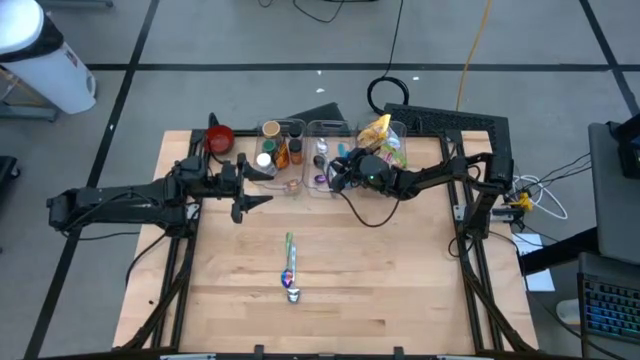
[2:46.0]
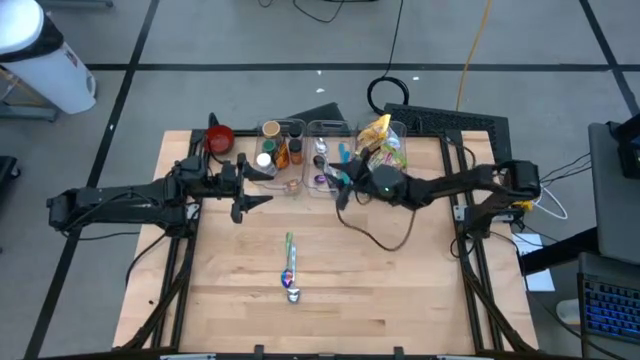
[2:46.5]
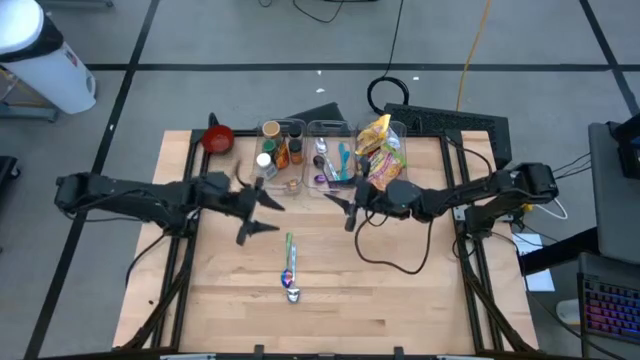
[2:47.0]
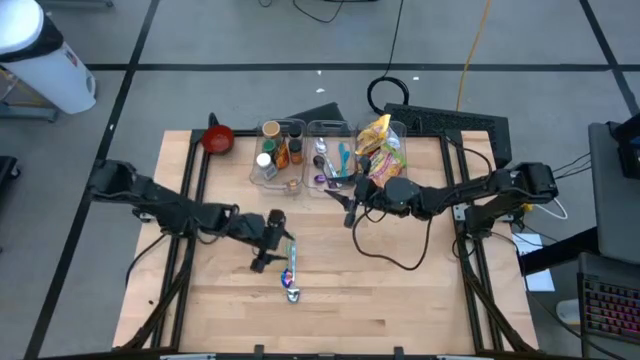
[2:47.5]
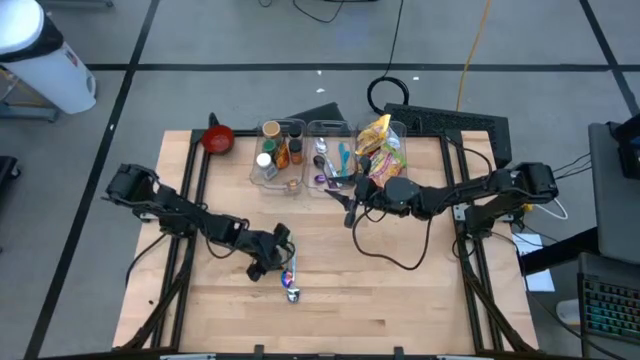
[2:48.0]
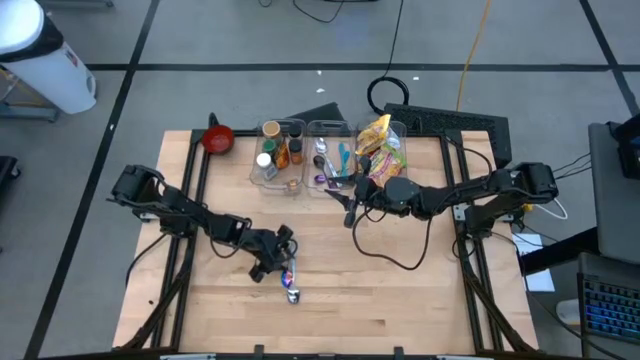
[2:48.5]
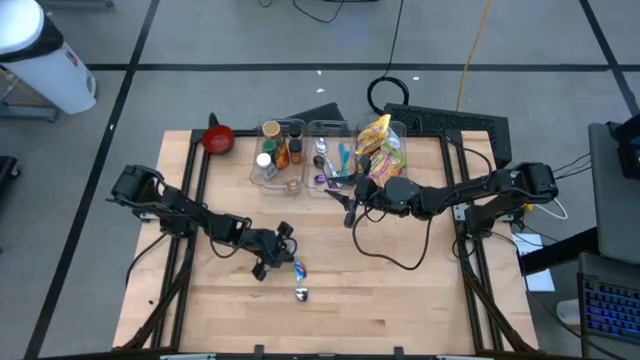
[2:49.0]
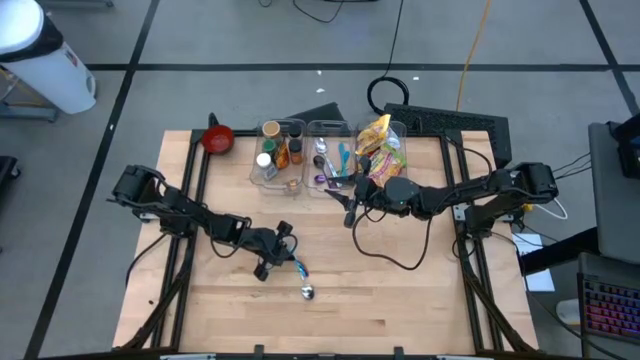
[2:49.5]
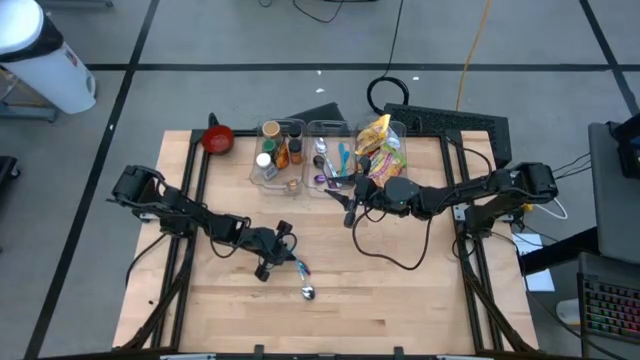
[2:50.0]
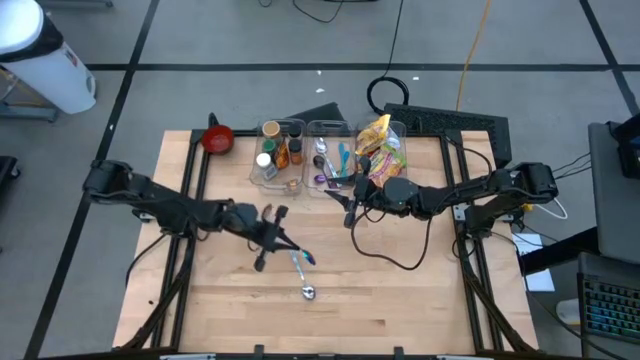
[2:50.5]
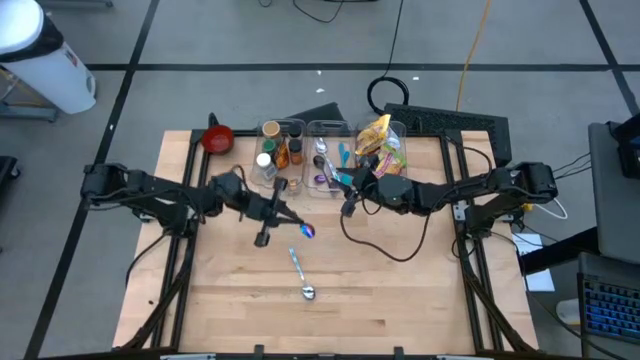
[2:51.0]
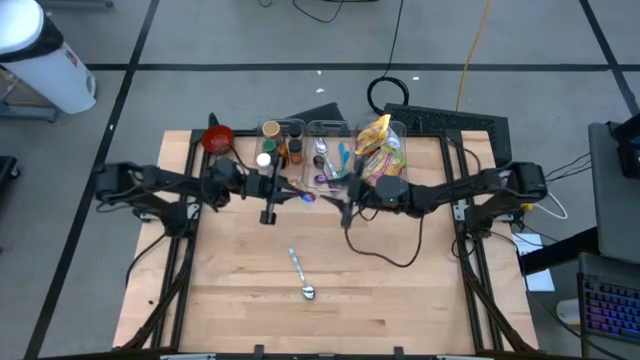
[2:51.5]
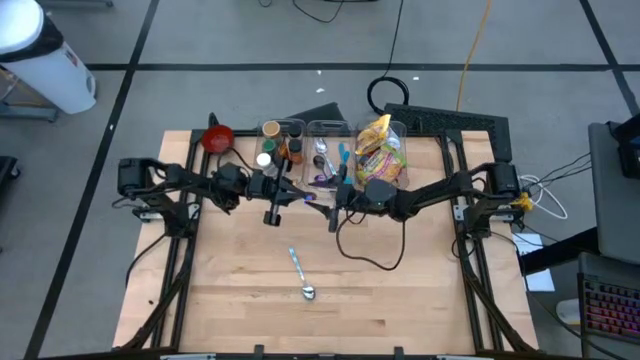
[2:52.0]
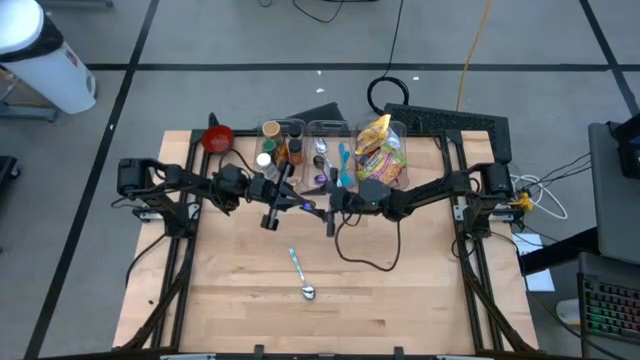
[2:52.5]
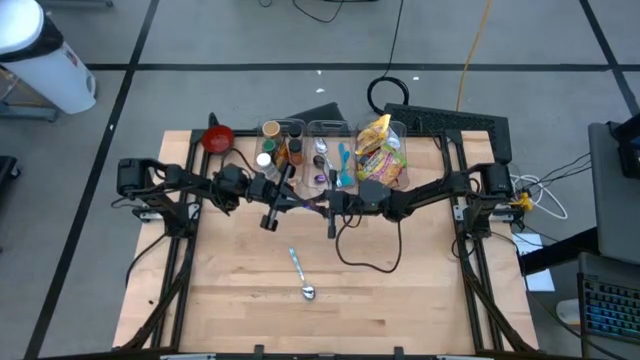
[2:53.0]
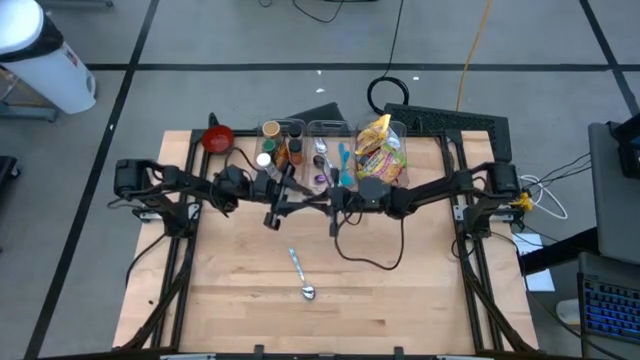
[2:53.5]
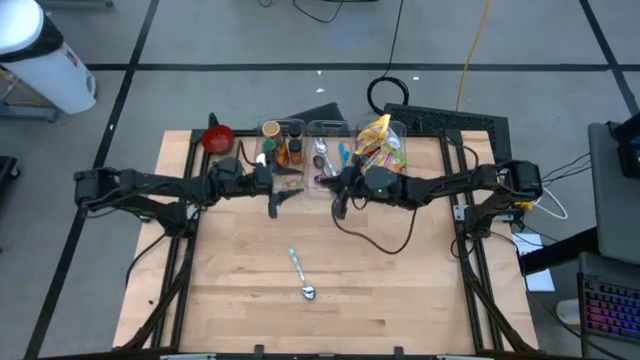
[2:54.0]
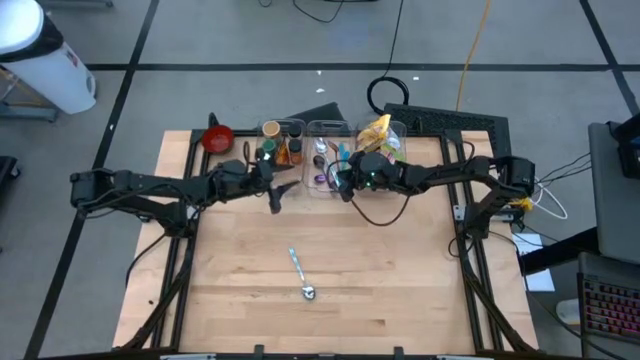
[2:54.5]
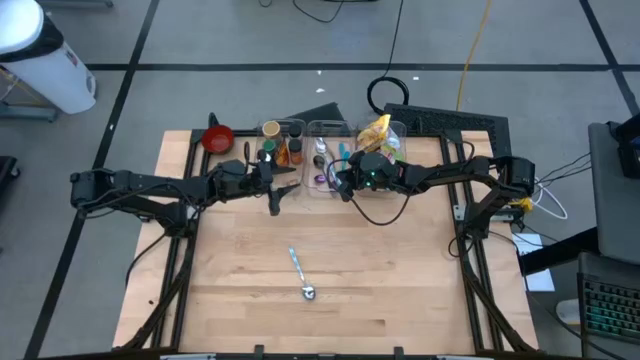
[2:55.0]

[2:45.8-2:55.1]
Task: Pick & Place Food Item
Put the purple green spoon into the middle transparent bin

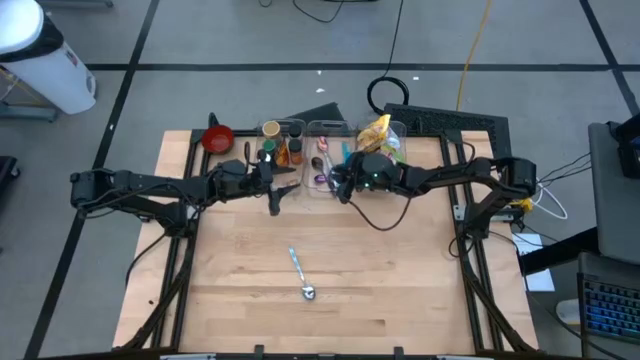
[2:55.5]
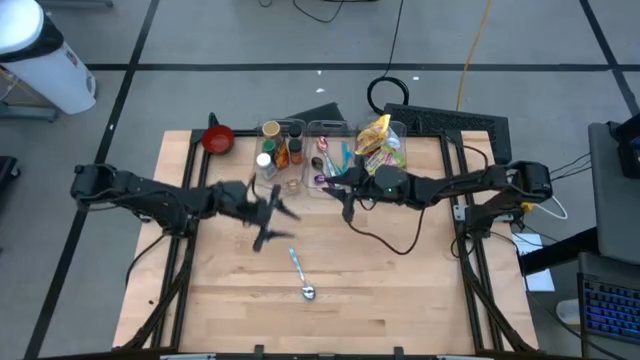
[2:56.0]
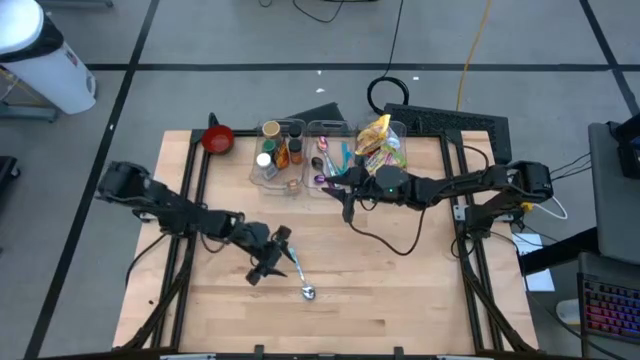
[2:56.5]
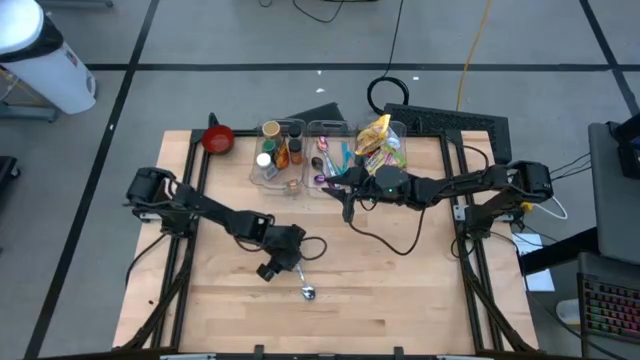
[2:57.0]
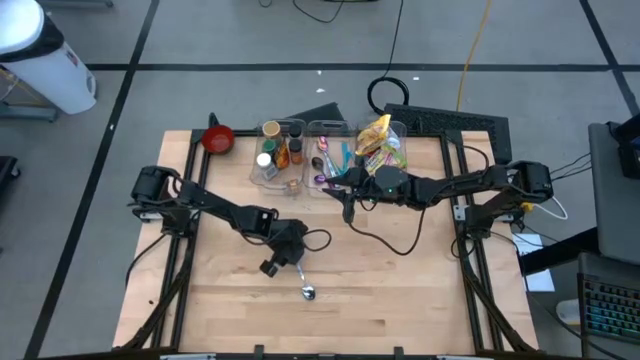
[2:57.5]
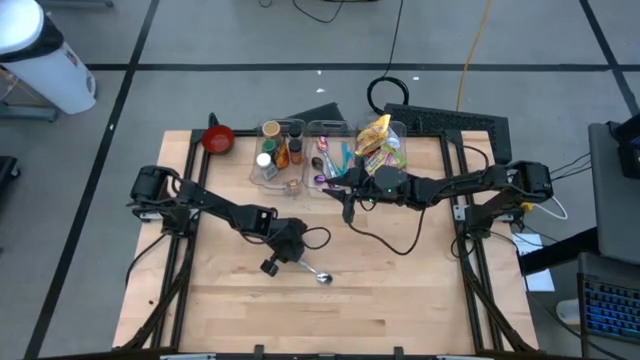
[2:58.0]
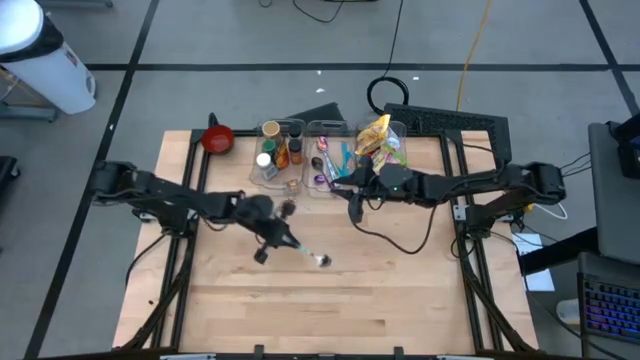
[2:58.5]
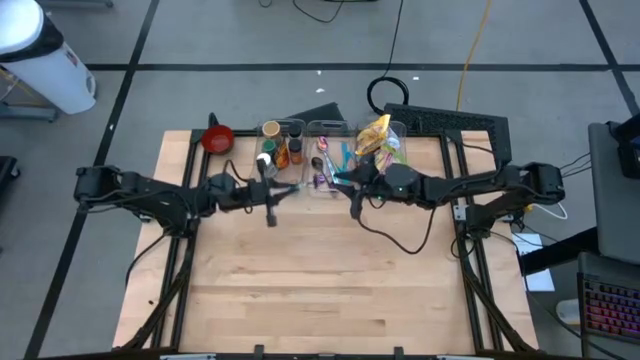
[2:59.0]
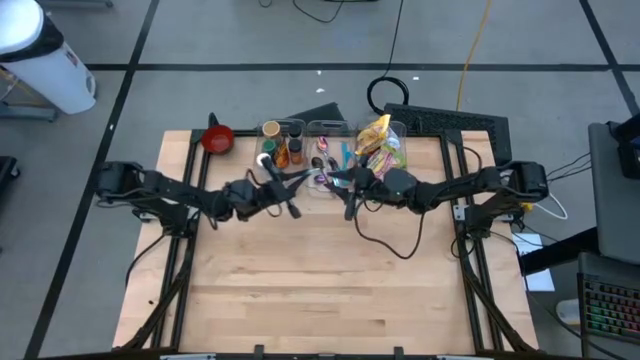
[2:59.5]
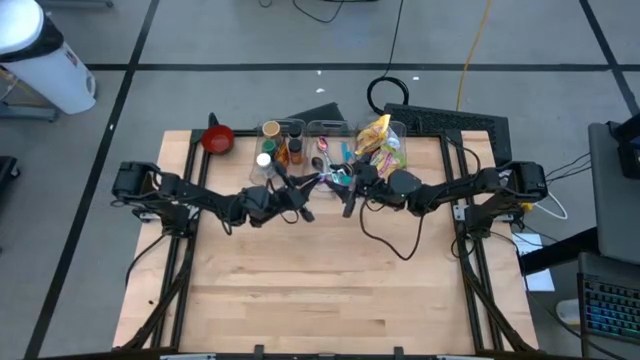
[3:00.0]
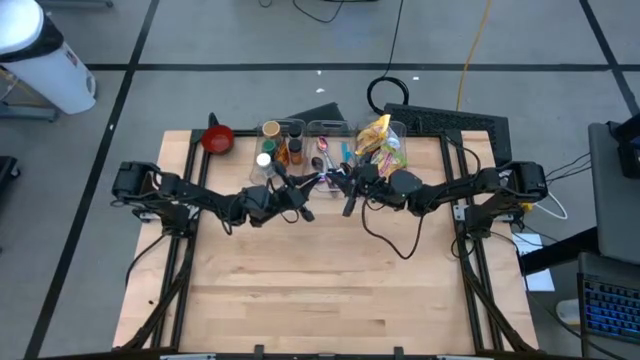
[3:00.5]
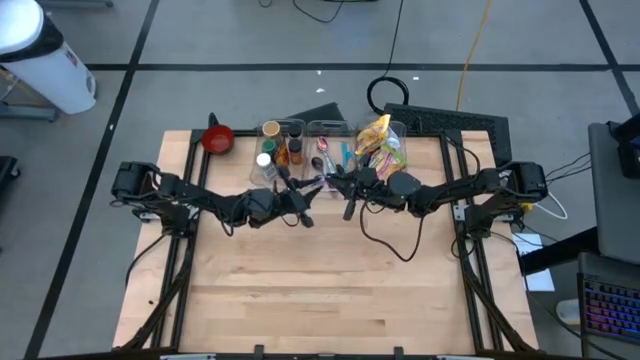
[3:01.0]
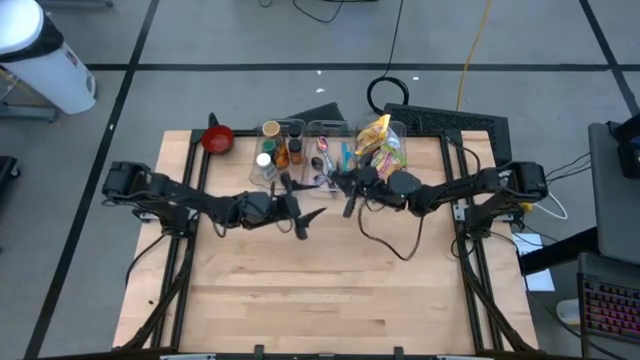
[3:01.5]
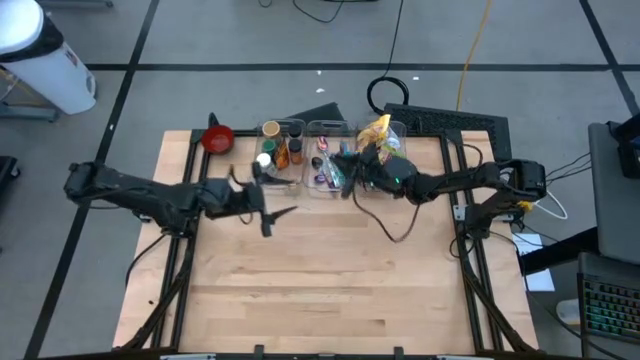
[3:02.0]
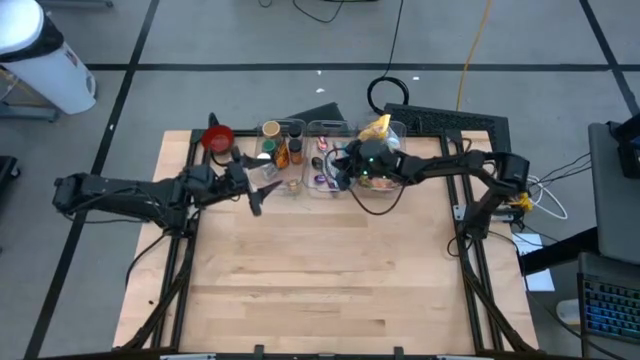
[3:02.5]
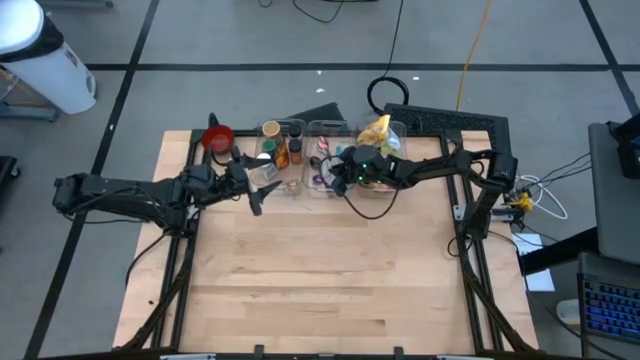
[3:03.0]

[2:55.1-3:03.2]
Put the white blue spoon into the middle transparent bin

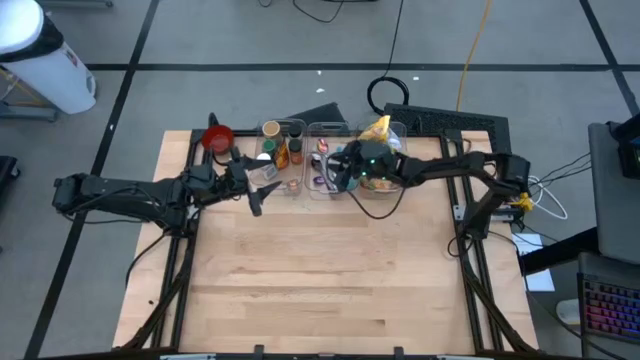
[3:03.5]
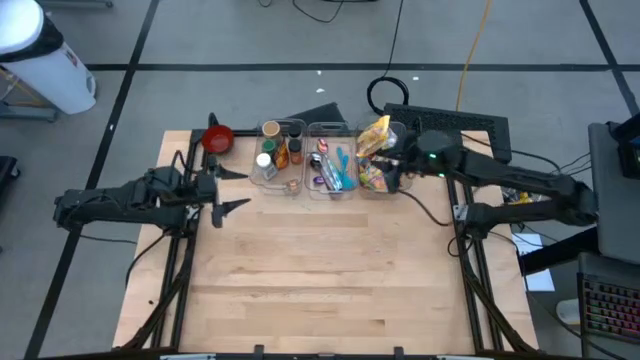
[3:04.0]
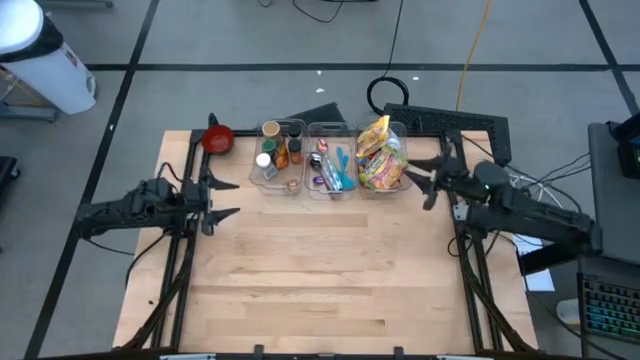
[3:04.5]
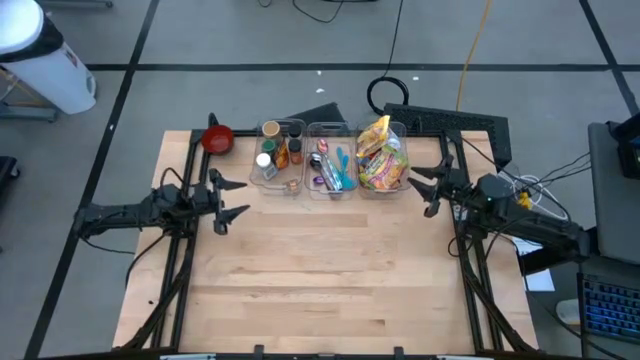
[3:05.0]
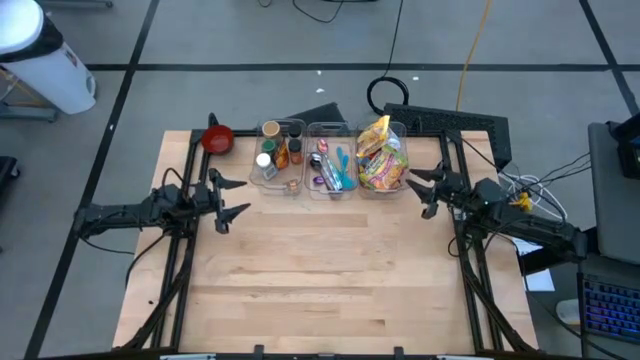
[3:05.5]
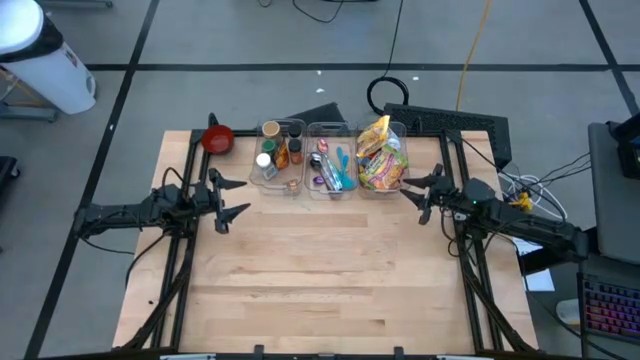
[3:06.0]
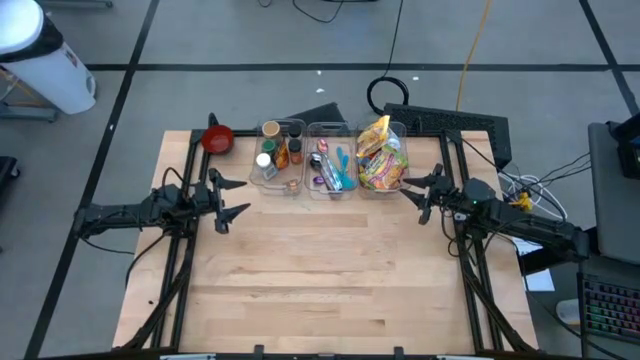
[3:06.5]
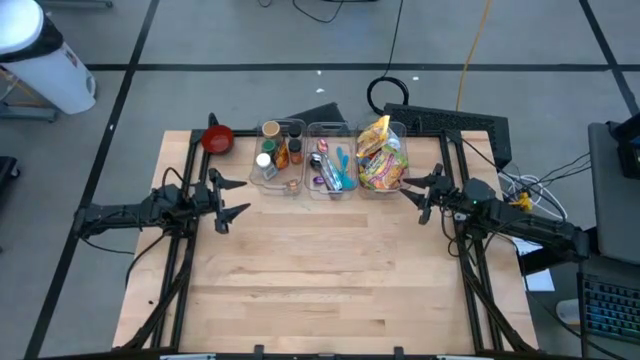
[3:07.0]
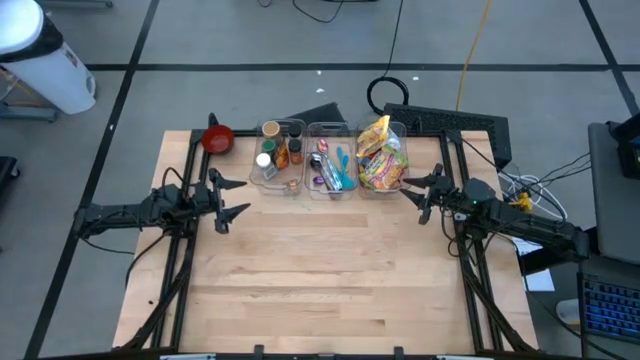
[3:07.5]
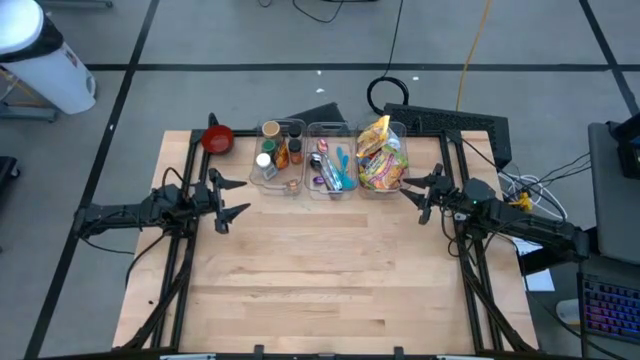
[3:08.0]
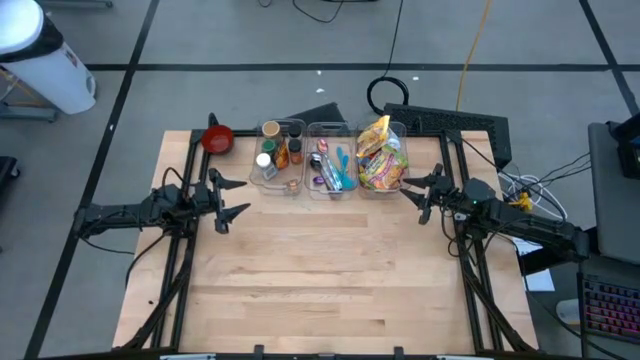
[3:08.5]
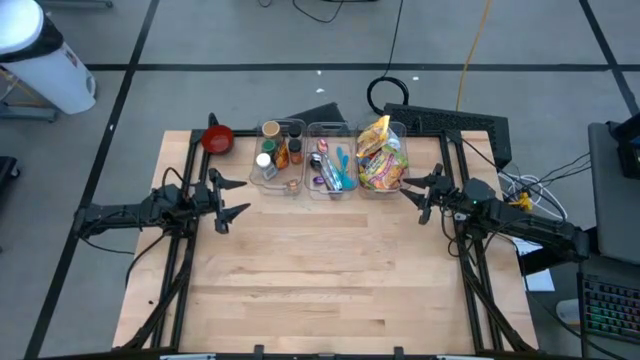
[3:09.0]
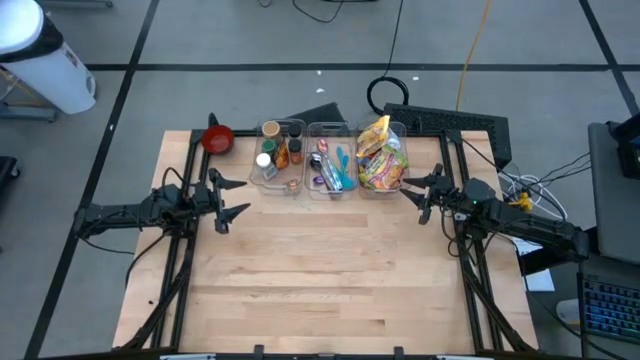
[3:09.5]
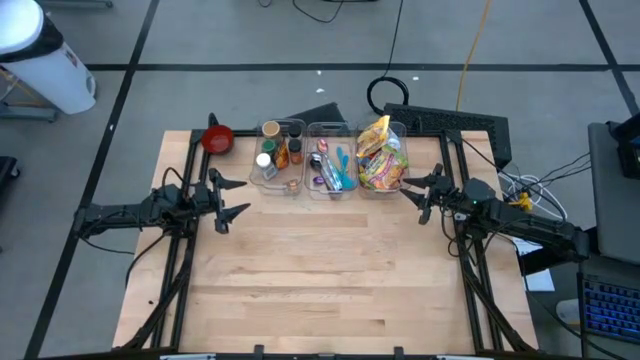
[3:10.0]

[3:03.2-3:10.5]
Return to Home Position
